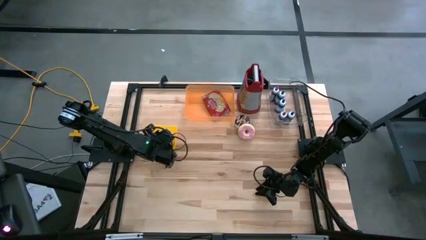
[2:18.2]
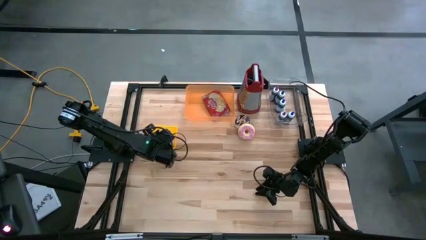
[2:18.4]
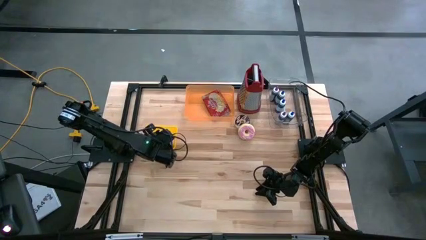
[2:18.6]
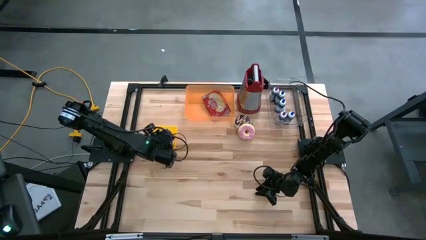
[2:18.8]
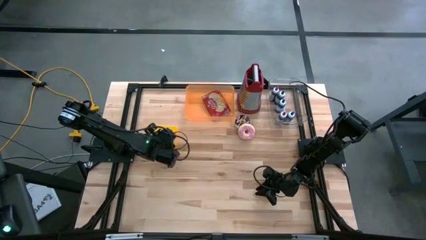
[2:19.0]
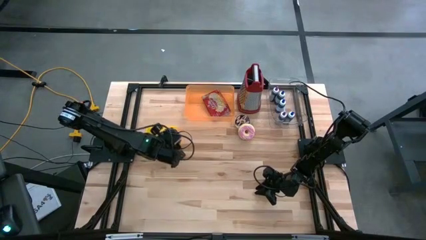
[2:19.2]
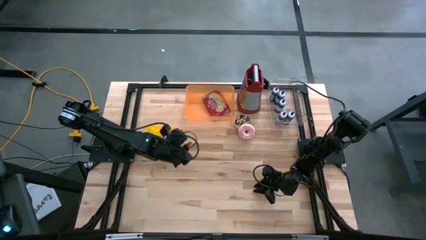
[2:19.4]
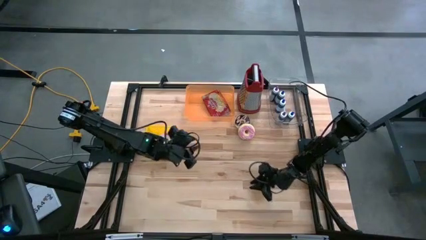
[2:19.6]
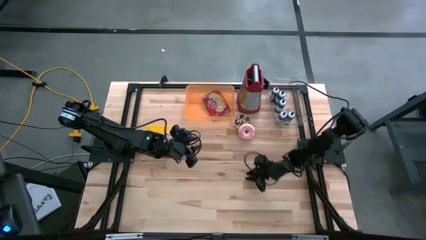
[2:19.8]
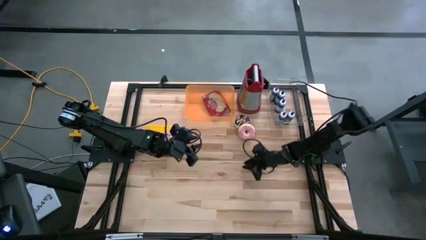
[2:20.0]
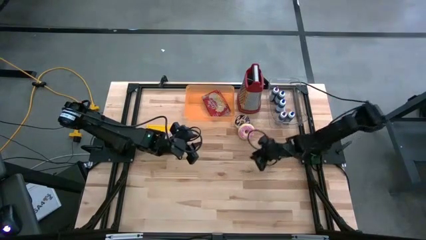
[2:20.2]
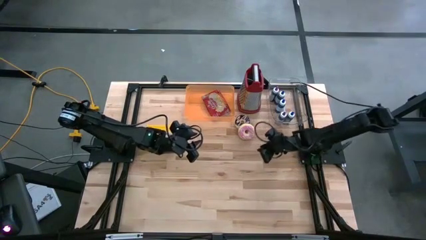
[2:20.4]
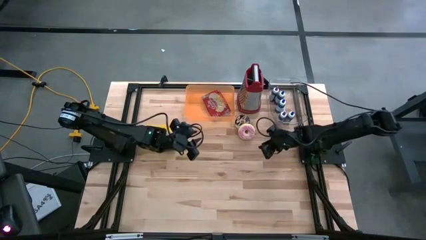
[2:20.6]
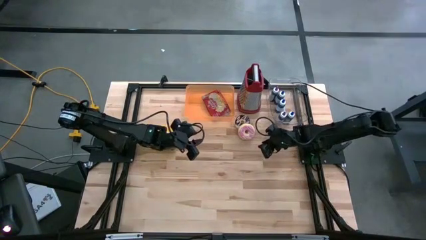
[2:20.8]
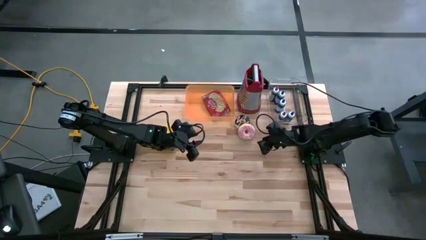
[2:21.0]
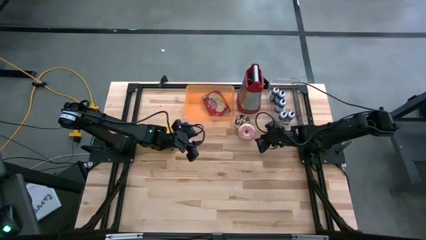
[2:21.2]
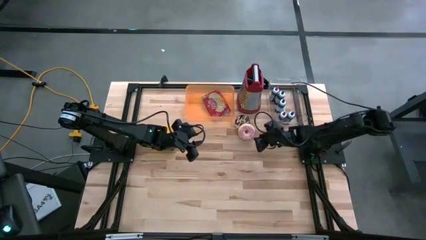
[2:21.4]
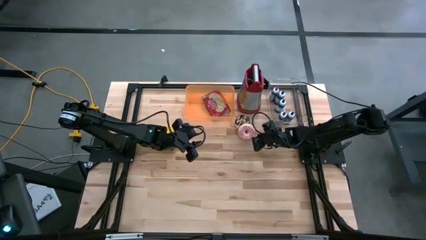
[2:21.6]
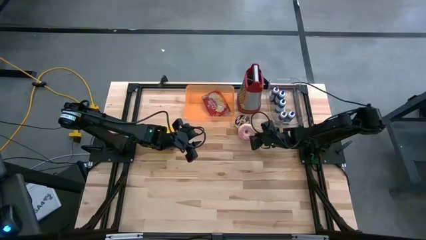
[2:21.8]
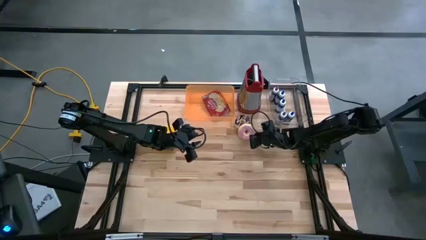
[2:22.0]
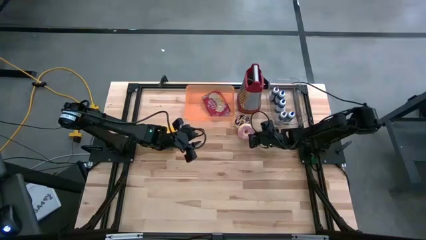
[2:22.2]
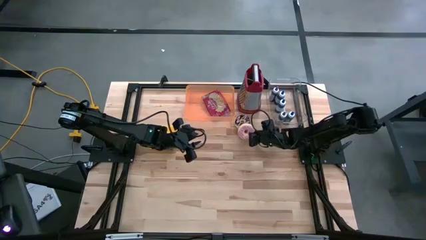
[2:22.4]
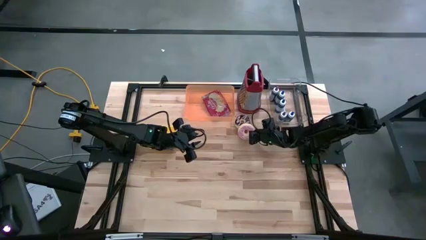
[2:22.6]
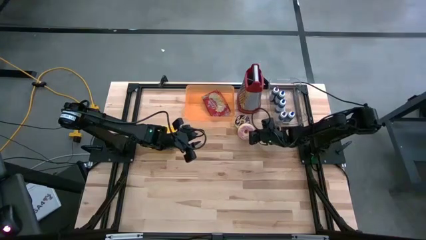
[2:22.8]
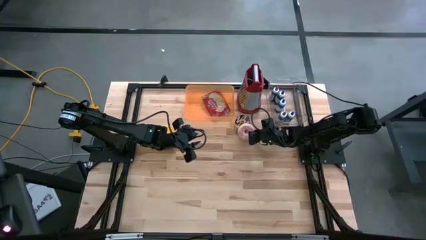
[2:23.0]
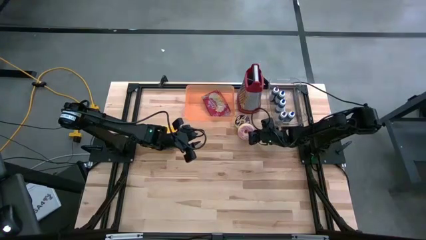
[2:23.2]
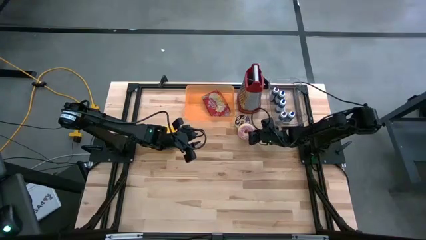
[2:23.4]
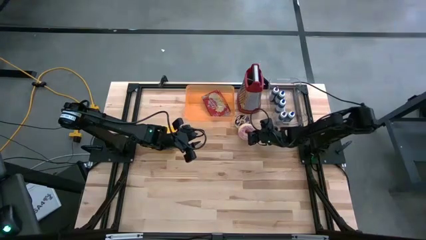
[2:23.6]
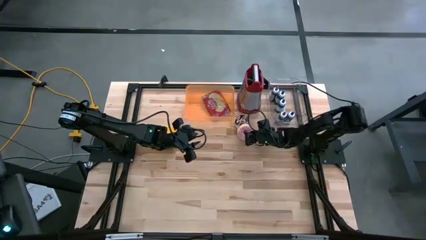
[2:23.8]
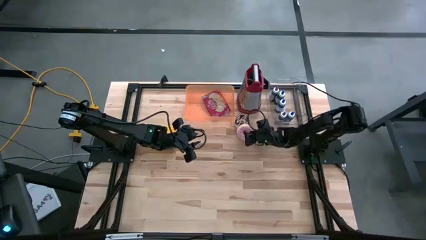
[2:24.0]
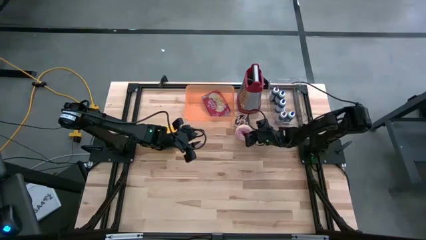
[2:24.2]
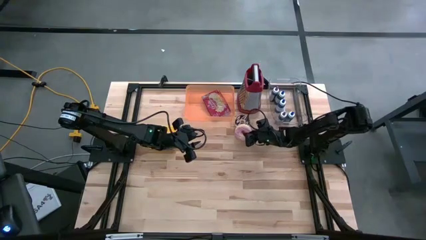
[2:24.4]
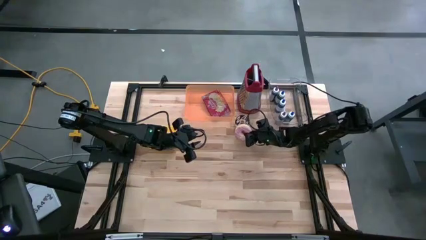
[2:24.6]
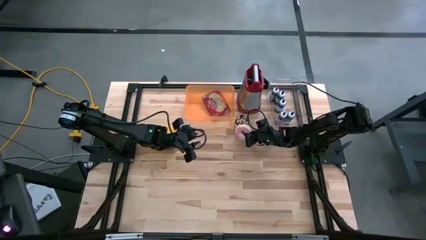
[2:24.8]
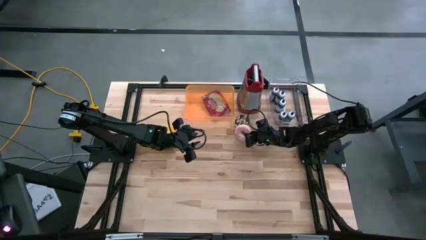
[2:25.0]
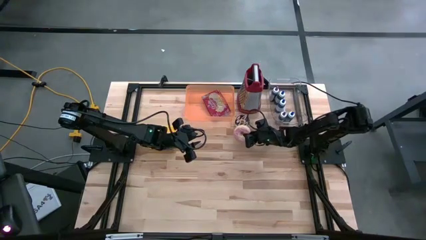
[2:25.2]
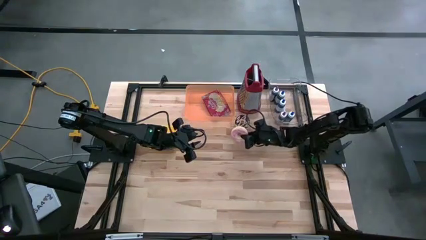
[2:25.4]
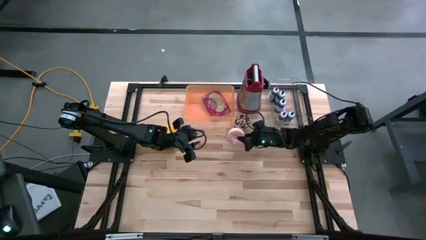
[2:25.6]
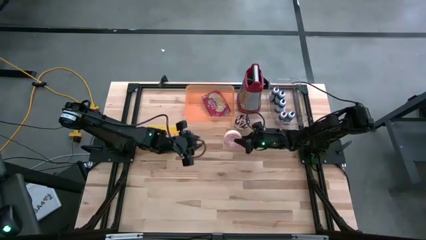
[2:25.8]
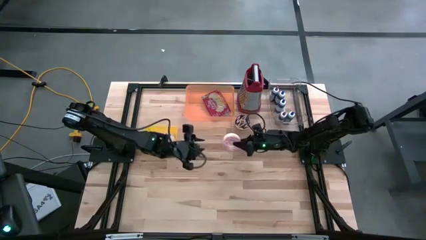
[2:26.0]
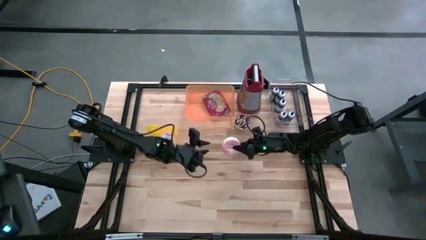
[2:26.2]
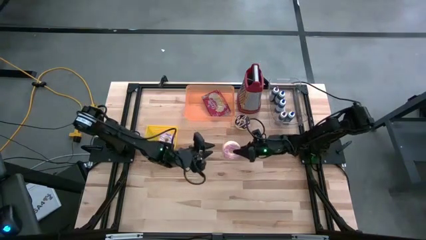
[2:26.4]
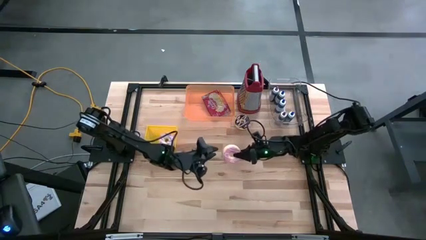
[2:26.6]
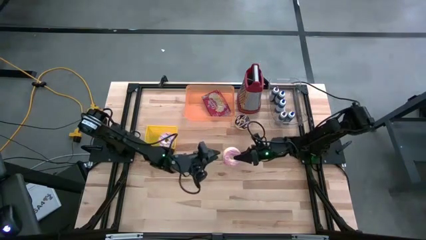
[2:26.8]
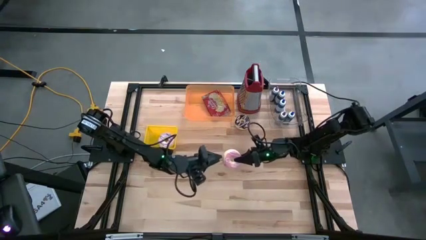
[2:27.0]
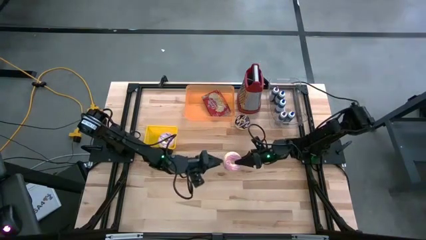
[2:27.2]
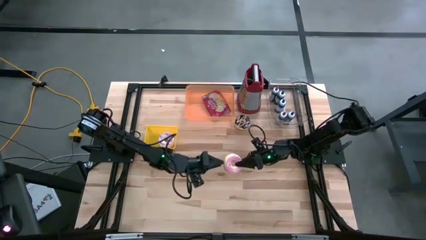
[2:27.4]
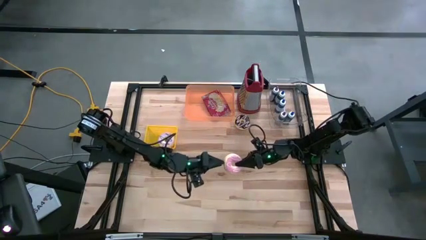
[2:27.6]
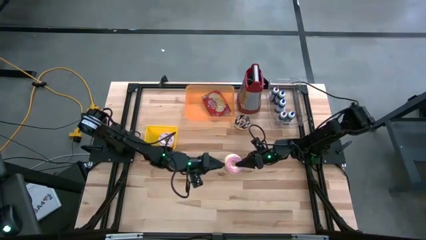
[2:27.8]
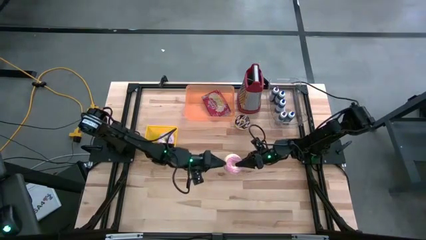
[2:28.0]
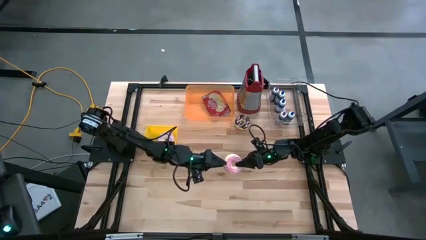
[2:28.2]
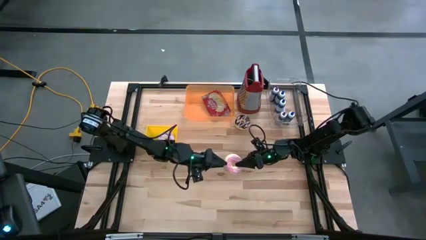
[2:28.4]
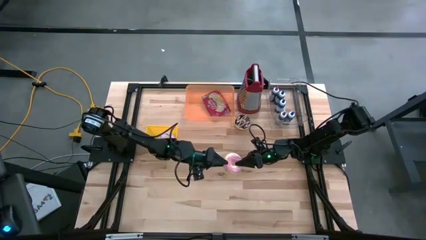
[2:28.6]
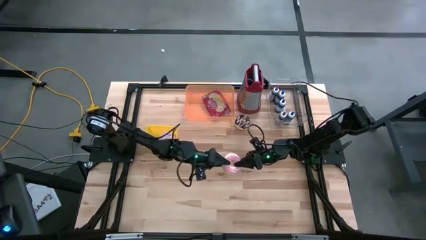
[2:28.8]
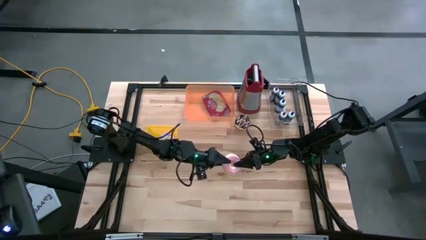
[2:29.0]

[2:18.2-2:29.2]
Task: Pick & Place Food Item
Put the pink donut into the yellow bin

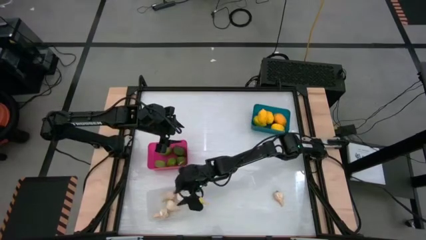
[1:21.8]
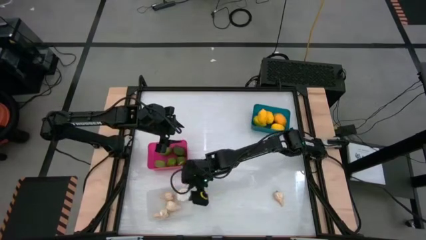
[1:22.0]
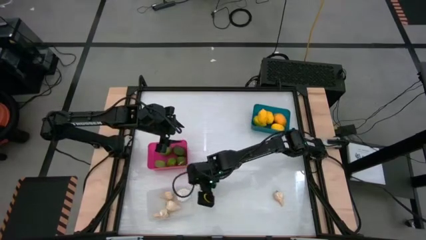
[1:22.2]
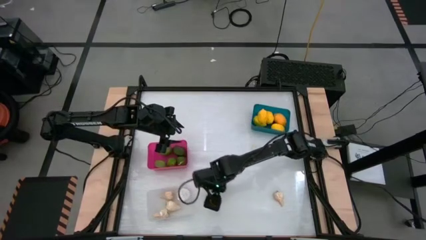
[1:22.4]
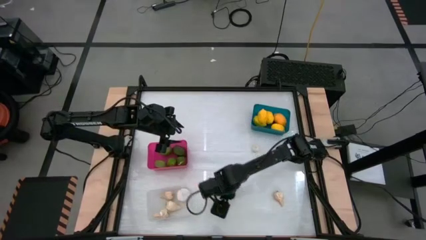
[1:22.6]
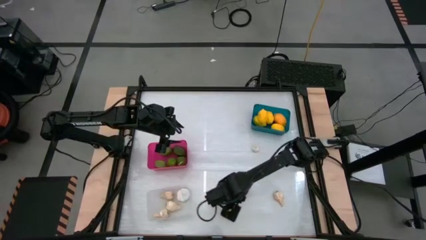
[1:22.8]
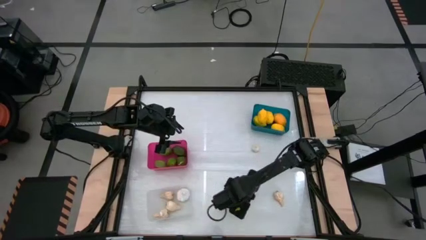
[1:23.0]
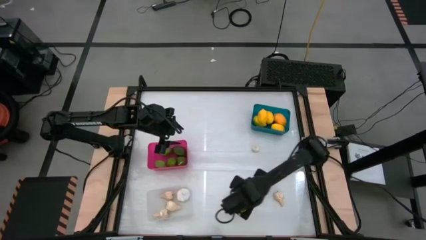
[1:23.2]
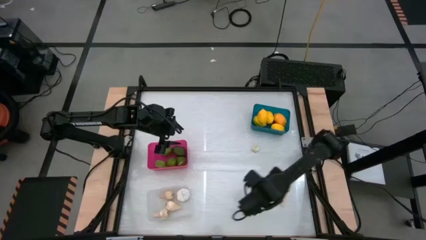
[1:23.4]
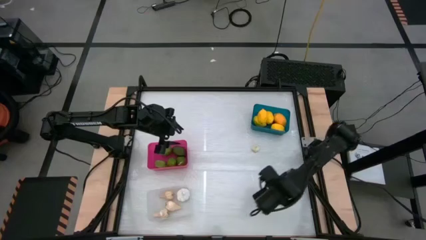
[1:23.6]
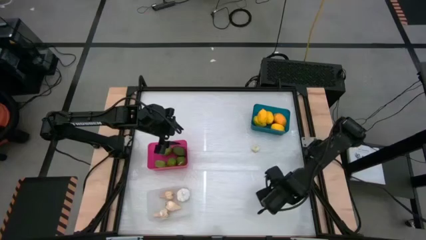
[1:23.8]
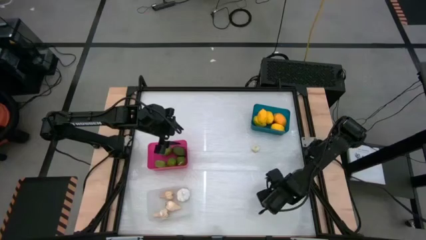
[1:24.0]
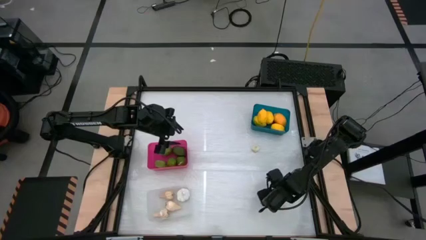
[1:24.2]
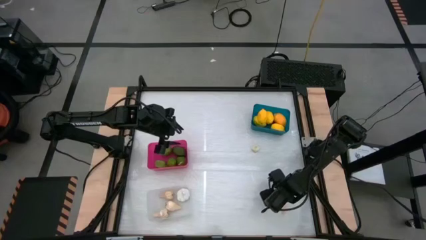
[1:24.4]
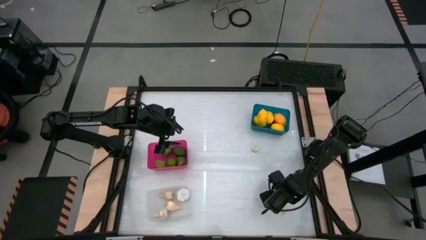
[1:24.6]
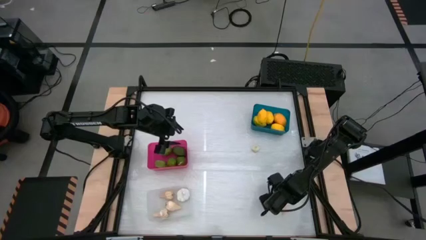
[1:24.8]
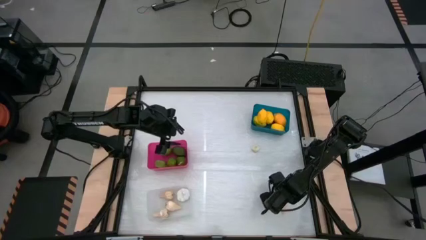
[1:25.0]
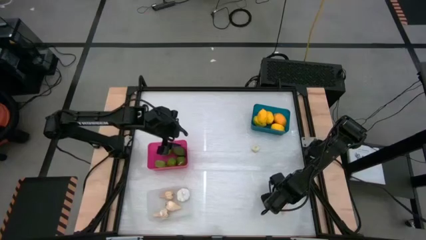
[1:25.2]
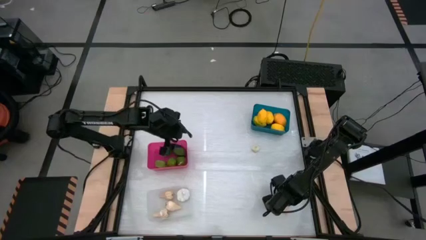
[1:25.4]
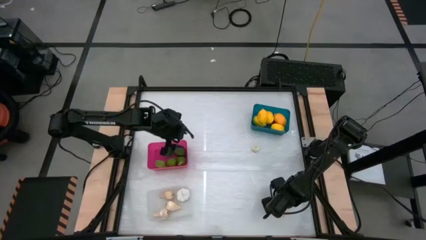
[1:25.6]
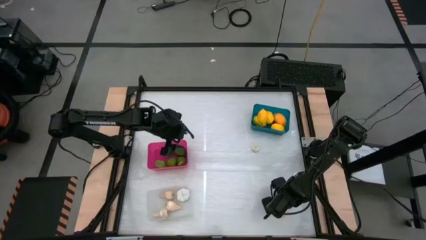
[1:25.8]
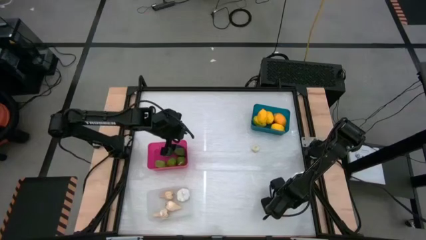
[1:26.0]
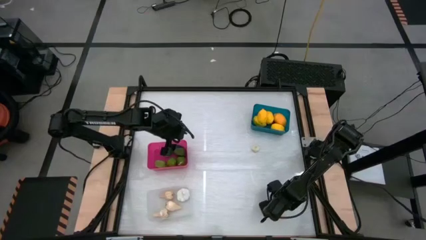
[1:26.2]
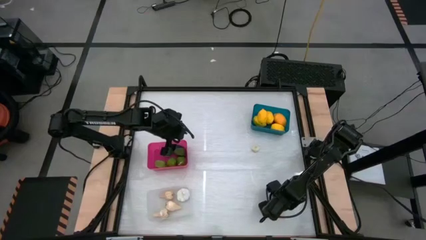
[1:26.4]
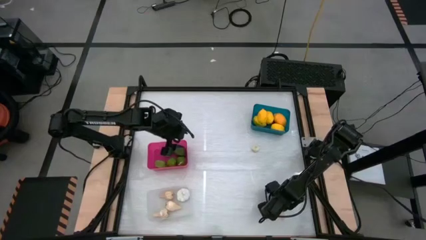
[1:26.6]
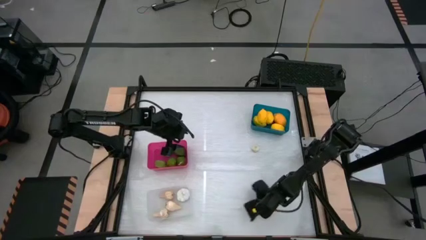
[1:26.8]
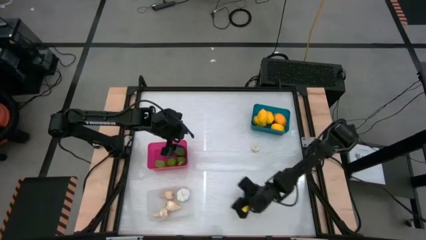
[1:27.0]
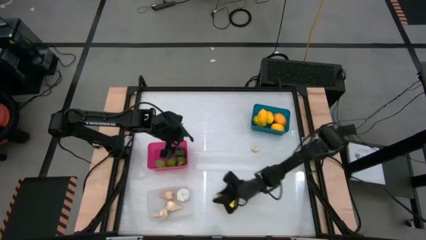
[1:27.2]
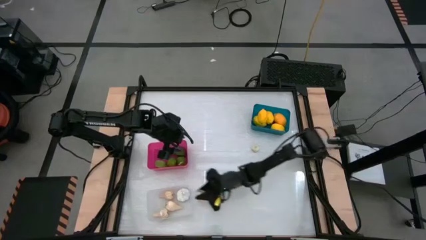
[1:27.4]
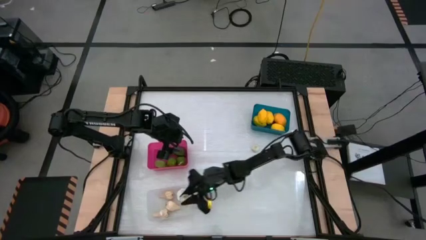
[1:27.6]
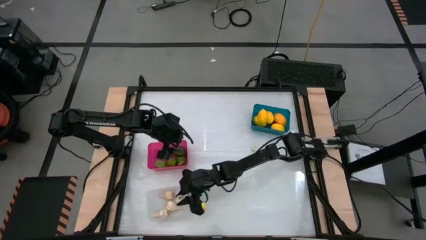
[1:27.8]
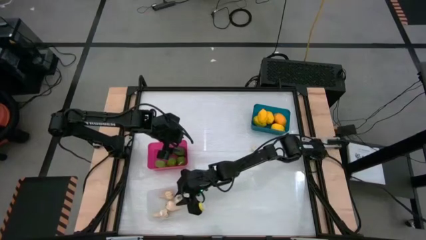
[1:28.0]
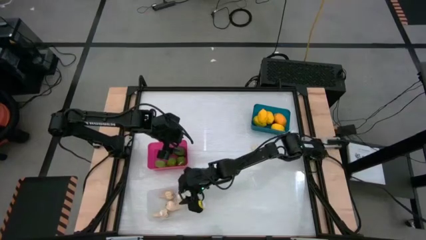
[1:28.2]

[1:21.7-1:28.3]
Task: Sort produce into baskets
Put the garlic into the white bin
